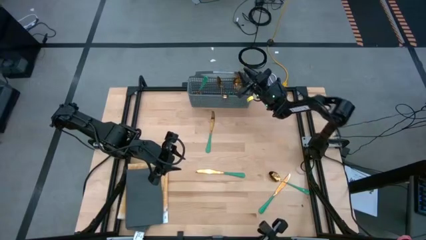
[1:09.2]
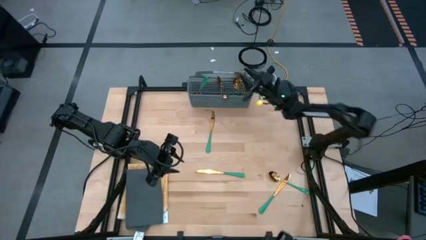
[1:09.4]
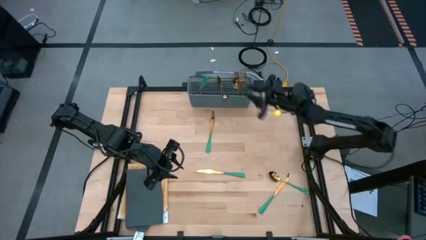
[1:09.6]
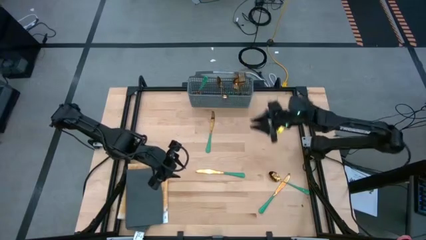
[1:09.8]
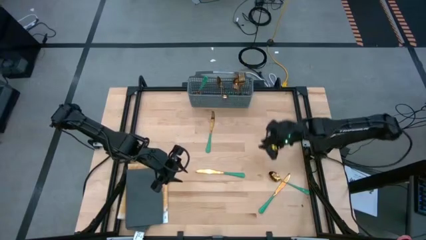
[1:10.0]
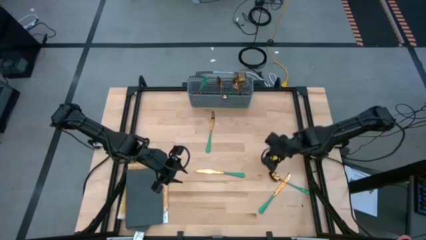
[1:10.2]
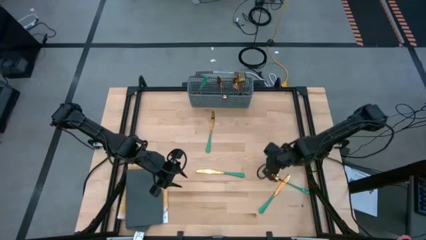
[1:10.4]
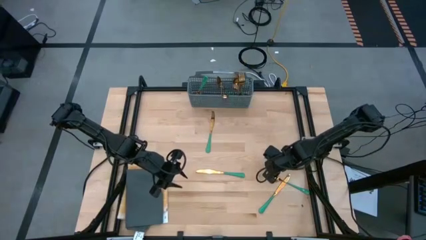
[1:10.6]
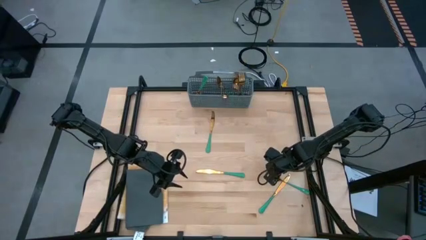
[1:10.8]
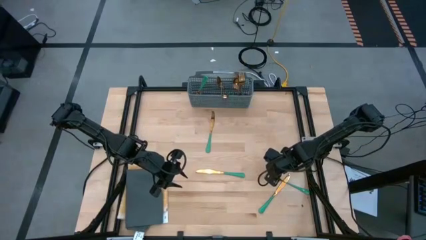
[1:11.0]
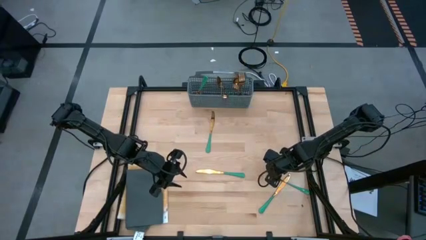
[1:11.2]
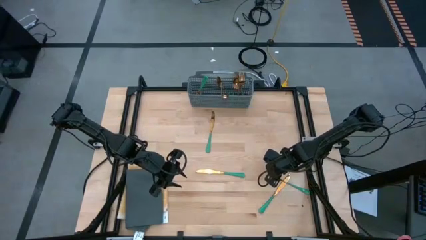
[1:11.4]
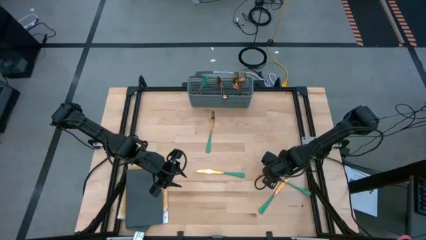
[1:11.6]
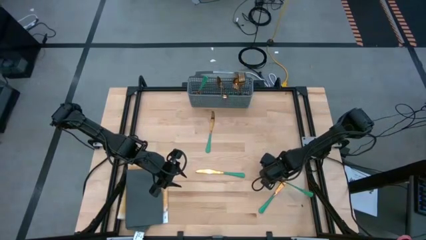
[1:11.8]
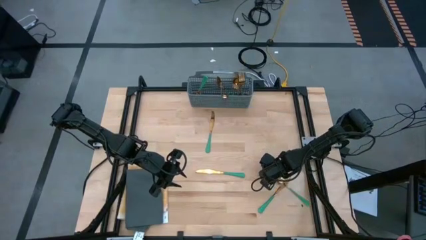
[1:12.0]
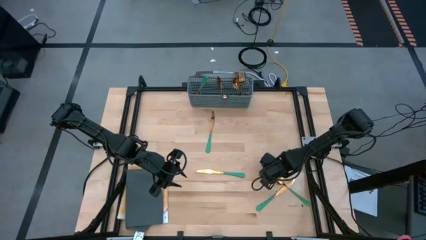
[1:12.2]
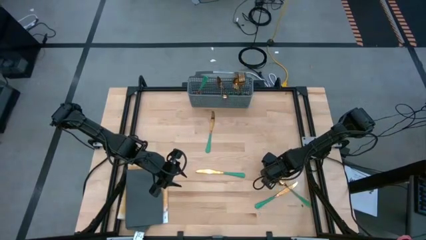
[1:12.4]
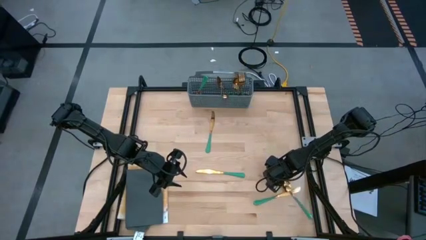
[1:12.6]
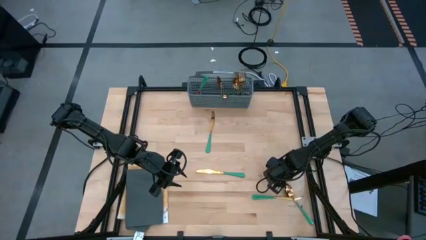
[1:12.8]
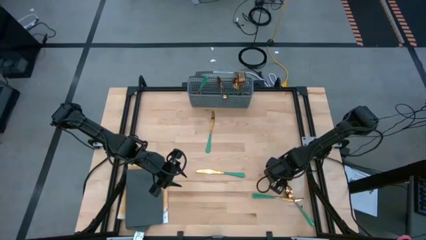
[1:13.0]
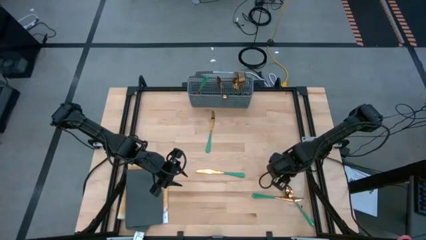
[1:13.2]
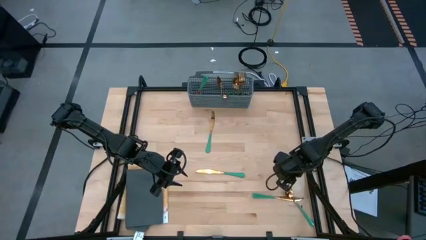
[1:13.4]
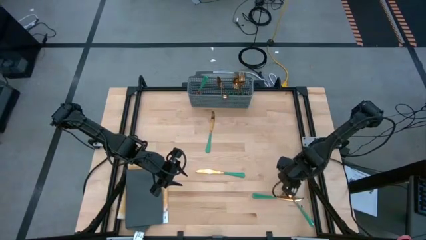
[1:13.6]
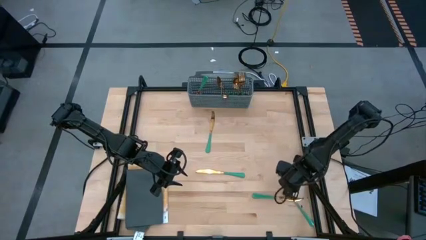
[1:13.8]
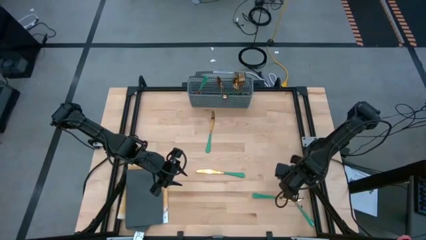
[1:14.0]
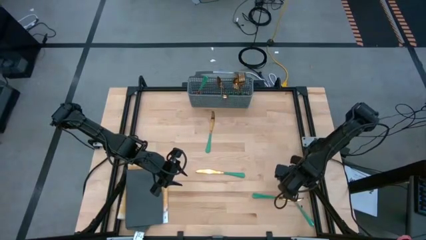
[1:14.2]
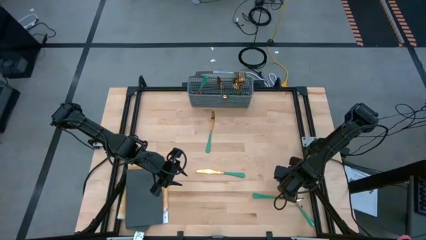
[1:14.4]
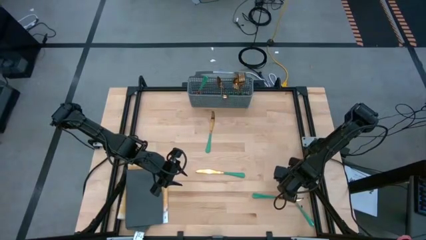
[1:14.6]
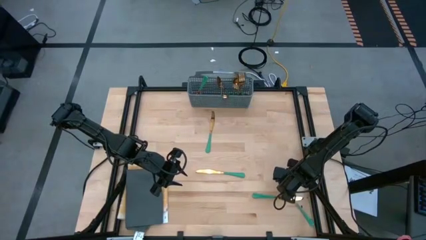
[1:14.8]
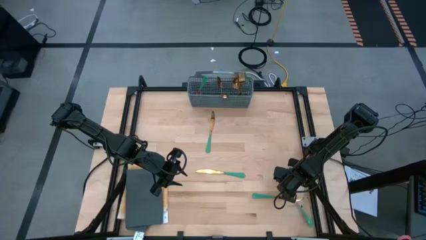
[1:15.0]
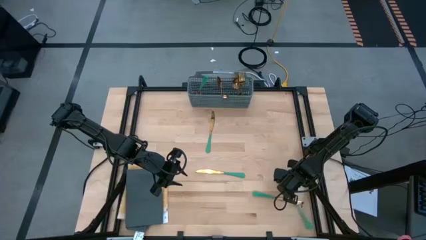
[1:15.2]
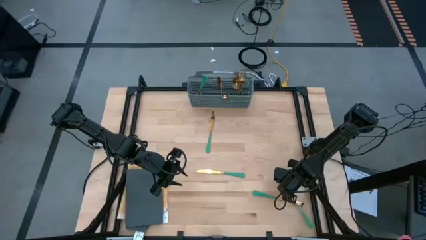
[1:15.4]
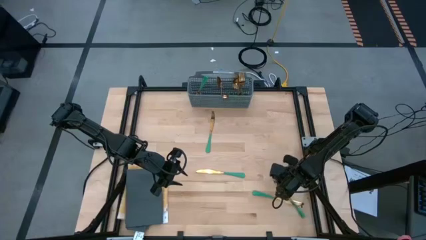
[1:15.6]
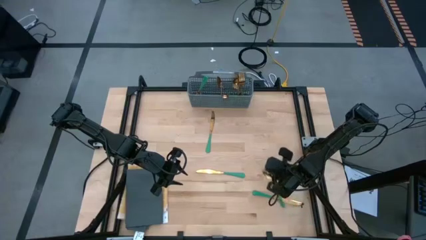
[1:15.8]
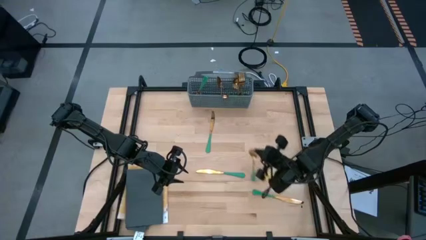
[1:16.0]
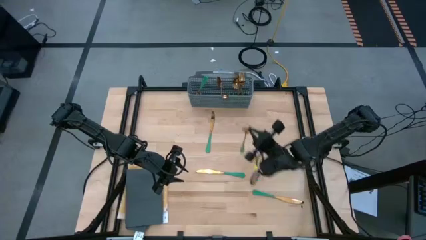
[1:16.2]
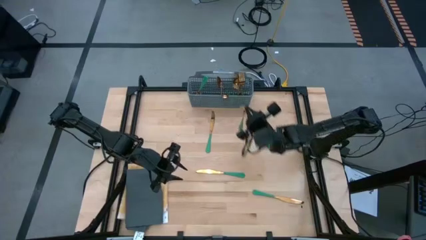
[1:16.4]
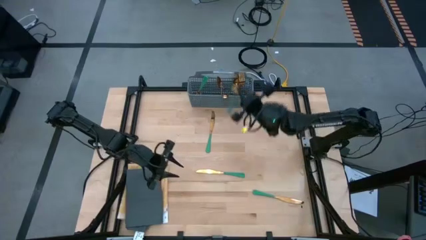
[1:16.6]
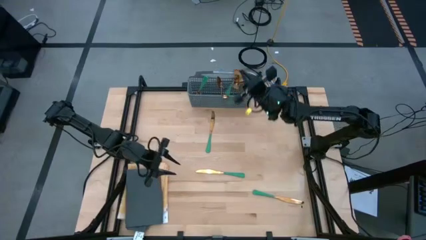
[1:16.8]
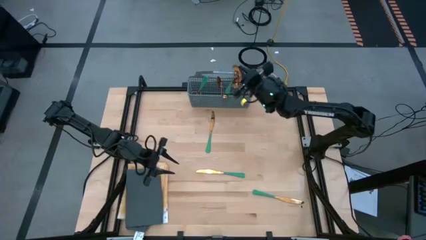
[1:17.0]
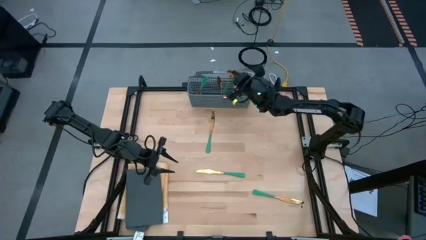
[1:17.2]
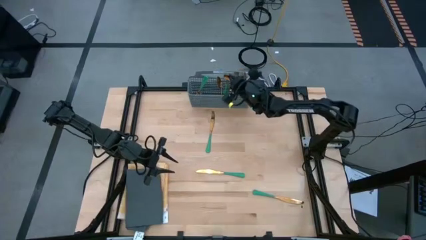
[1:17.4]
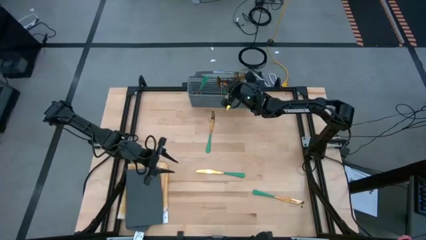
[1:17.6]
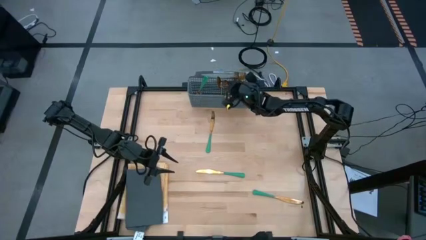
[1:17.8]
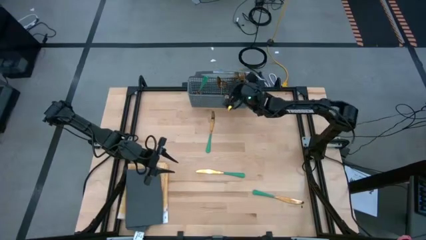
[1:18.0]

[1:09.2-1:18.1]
Task: Sort silverware
Put the green spoon into the gray silverware holder

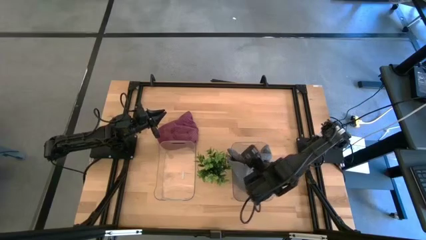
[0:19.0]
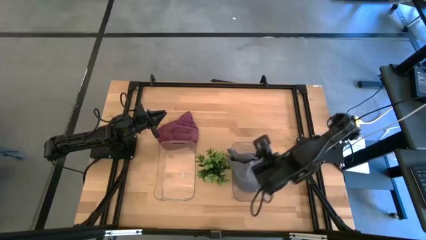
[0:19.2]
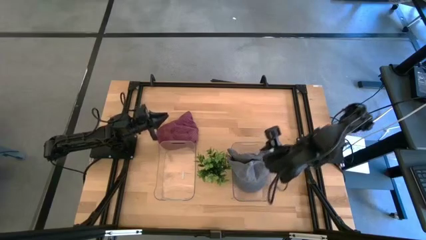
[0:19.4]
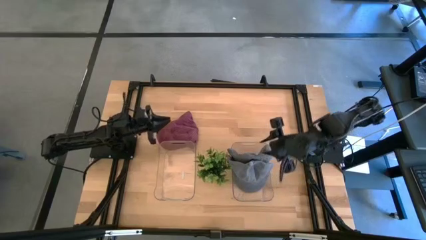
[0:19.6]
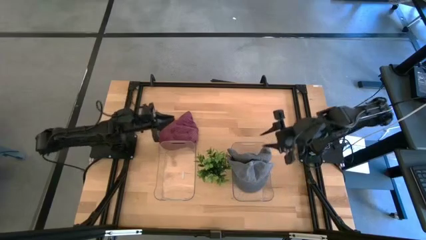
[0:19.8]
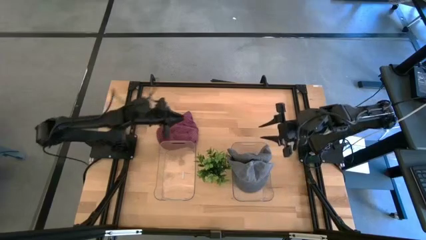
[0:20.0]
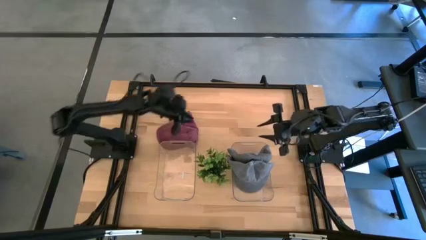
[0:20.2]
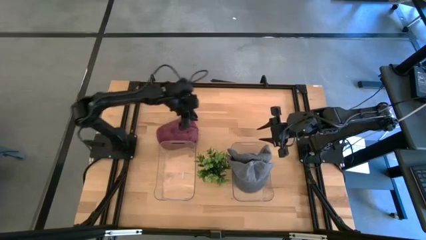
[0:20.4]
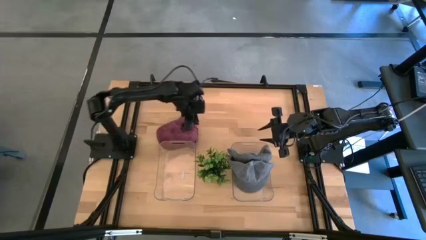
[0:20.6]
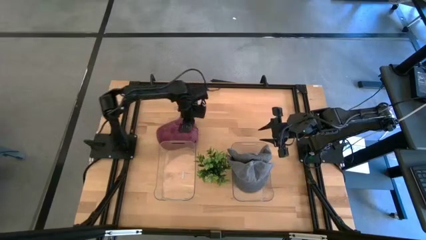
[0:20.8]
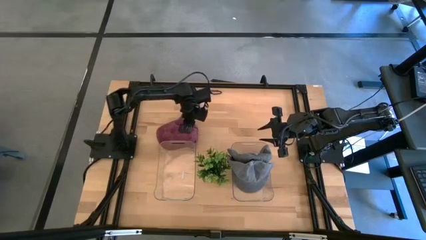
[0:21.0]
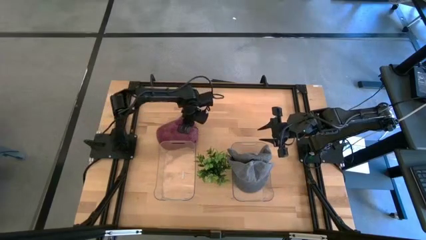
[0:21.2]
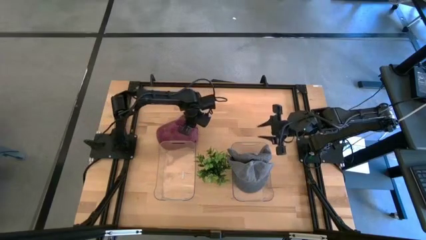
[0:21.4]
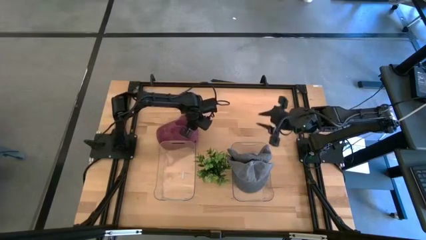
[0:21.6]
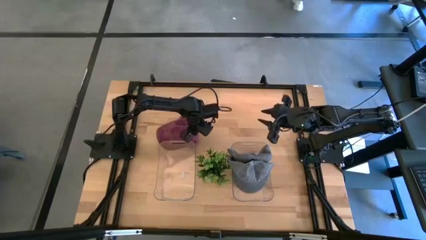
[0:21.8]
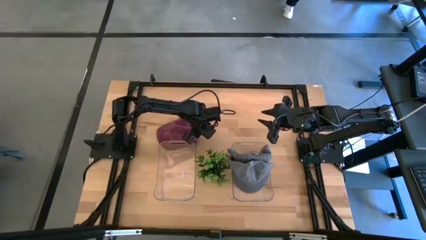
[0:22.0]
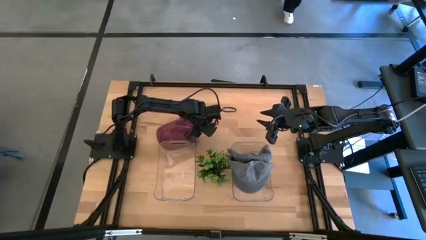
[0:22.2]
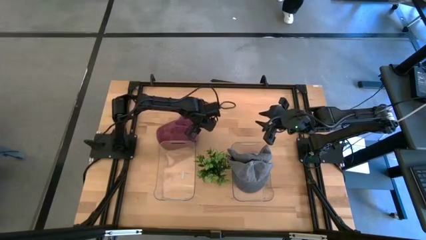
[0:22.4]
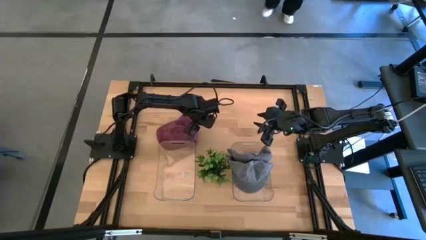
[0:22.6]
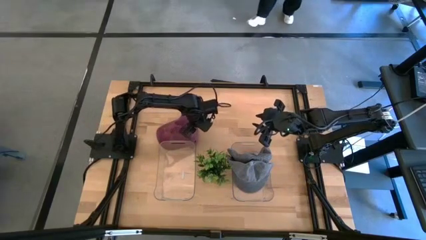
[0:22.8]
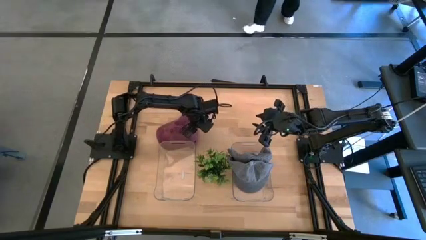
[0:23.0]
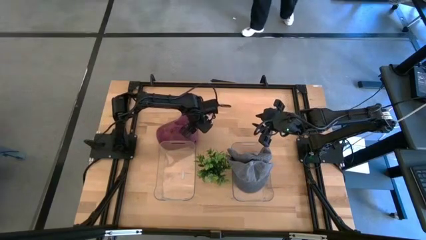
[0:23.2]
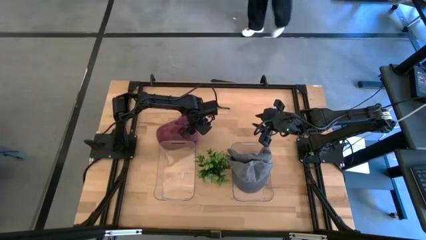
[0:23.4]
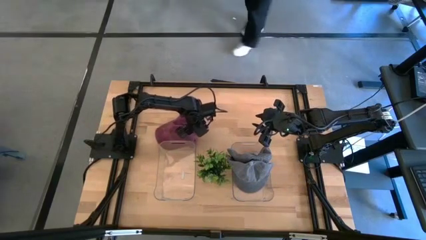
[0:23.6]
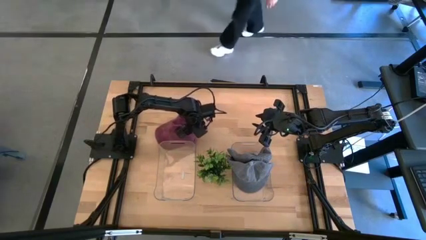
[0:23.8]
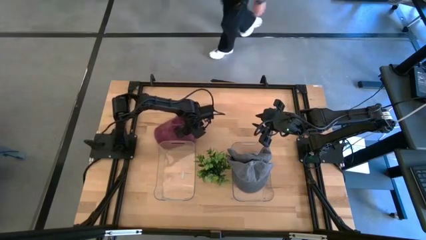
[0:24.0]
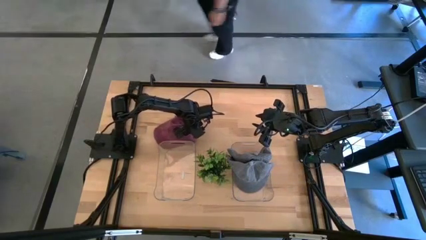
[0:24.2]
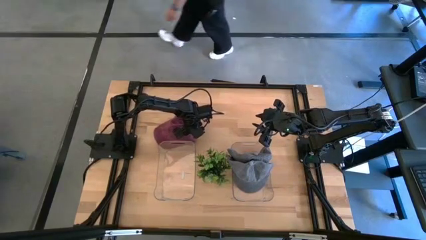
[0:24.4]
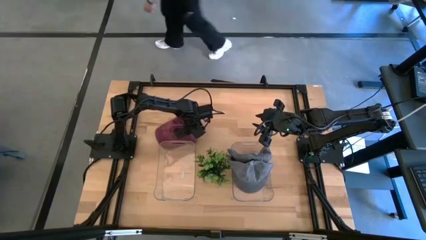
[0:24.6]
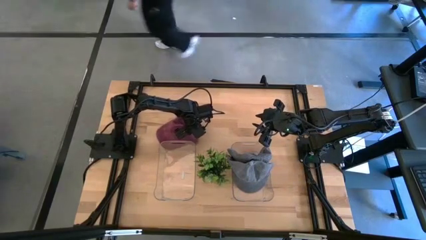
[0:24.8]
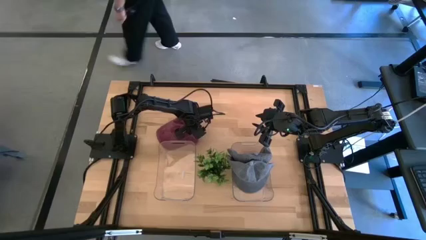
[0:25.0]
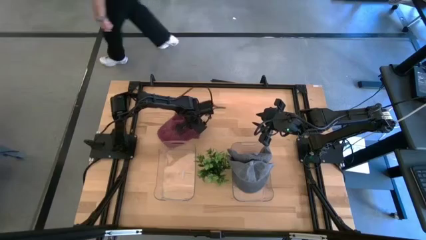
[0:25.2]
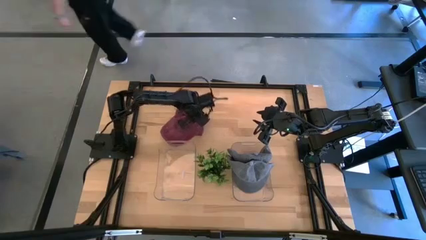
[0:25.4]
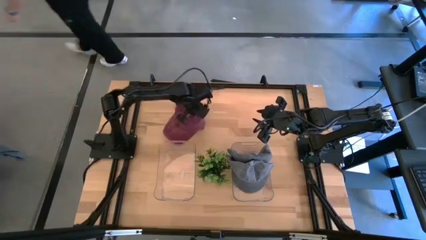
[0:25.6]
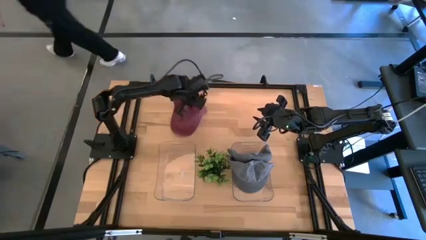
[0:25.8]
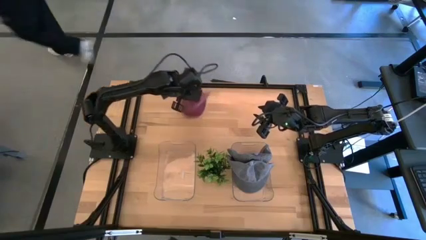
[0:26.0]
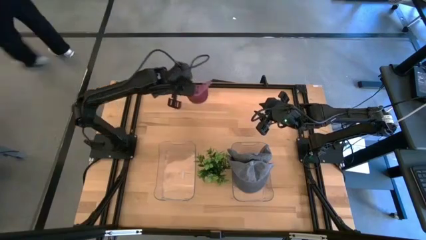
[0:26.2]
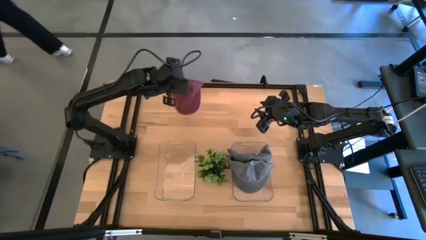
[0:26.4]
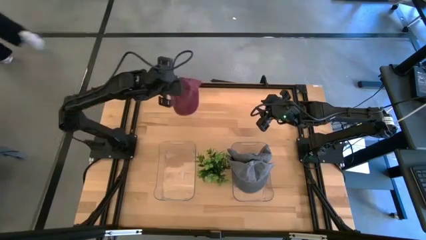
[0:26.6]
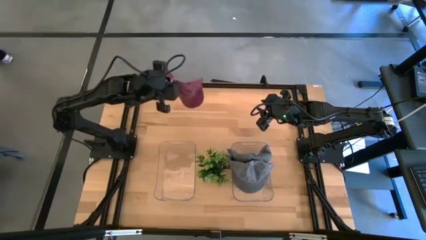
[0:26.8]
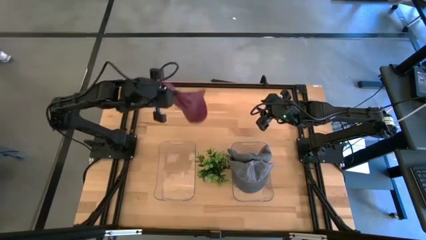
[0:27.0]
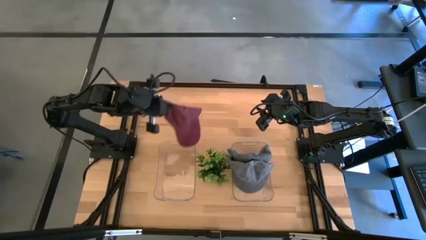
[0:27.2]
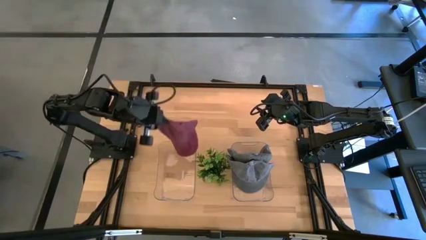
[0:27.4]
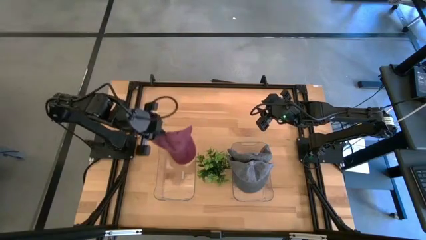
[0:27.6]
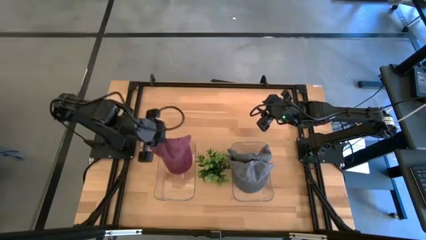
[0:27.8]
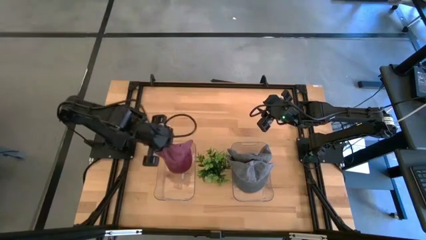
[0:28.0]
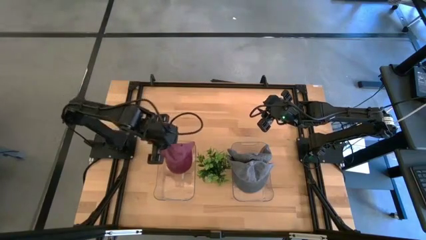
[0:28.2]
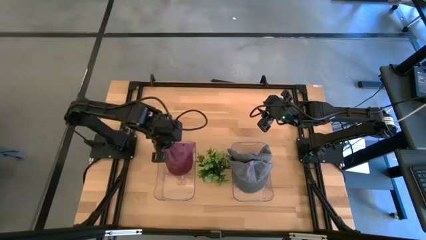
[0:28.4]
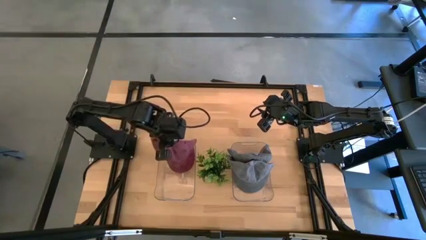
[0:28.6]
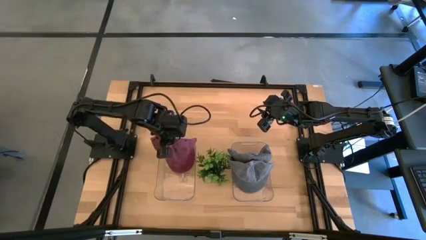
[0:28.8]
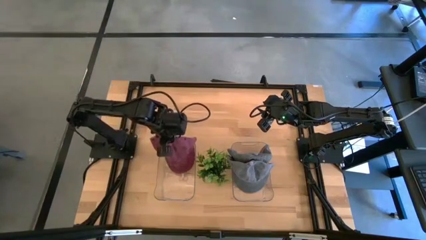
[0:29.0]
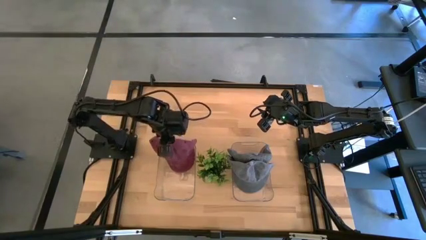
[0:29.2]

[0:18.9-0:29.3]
Task: Pick & Place hat
Put the red cap into the left transparent bin
